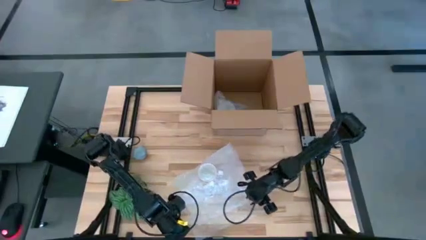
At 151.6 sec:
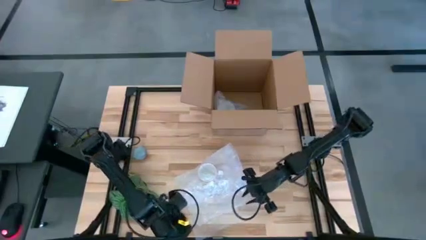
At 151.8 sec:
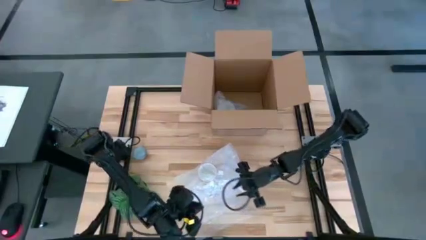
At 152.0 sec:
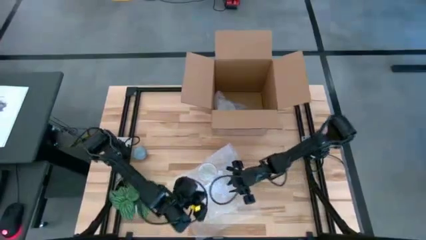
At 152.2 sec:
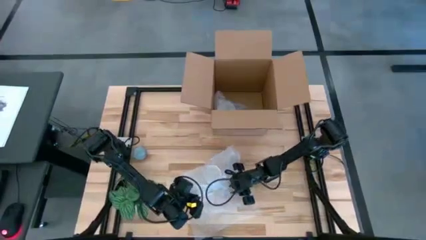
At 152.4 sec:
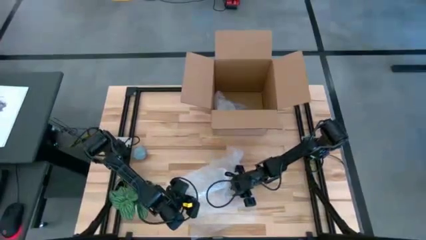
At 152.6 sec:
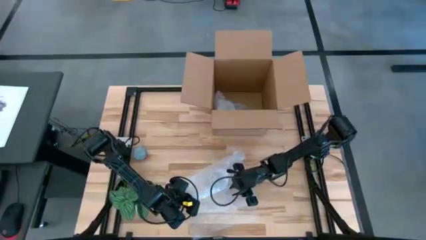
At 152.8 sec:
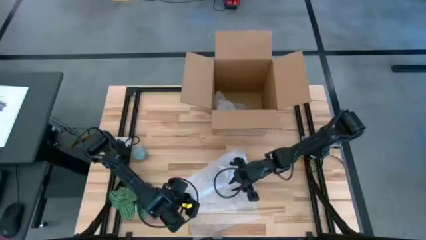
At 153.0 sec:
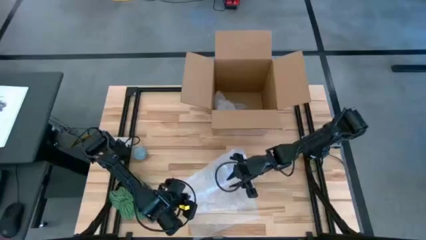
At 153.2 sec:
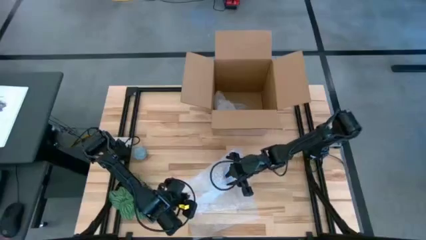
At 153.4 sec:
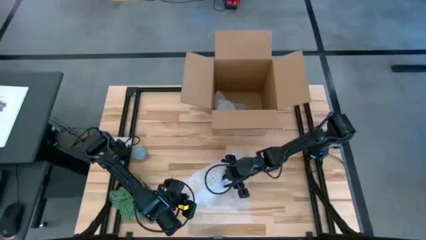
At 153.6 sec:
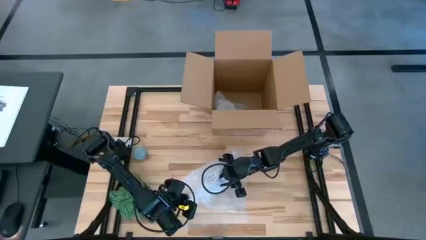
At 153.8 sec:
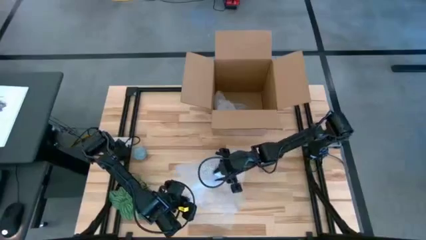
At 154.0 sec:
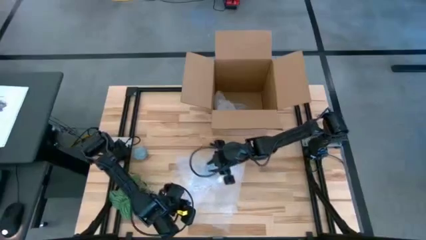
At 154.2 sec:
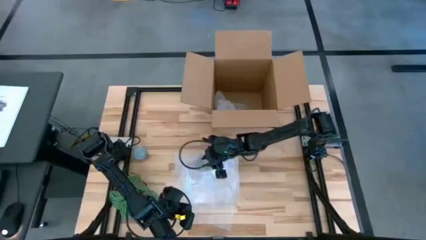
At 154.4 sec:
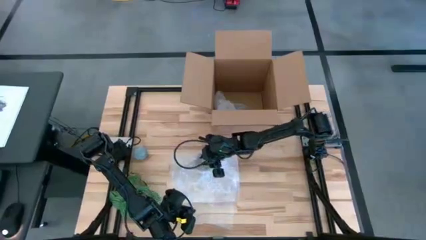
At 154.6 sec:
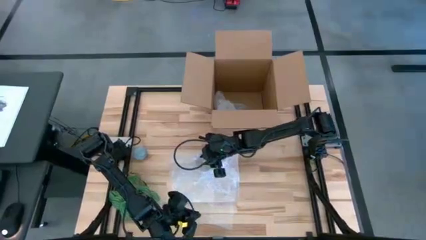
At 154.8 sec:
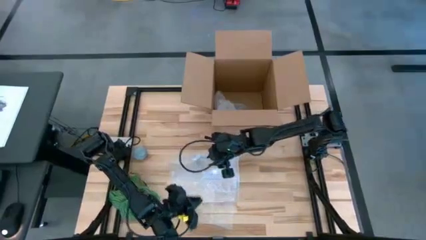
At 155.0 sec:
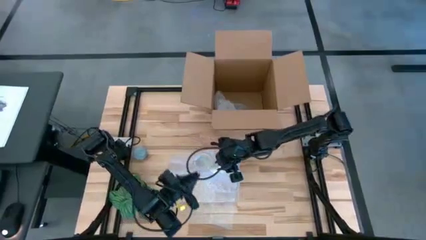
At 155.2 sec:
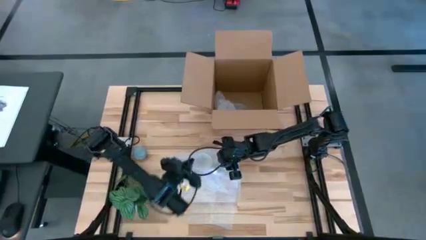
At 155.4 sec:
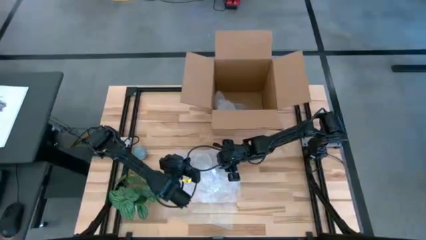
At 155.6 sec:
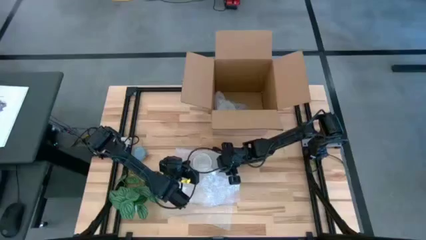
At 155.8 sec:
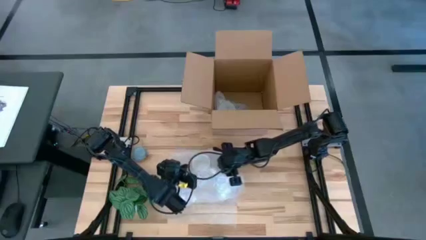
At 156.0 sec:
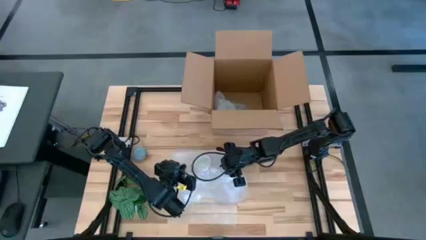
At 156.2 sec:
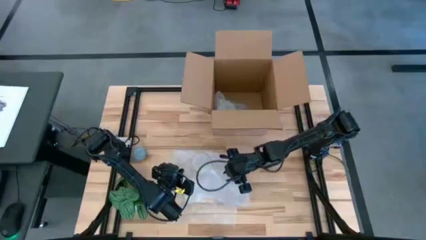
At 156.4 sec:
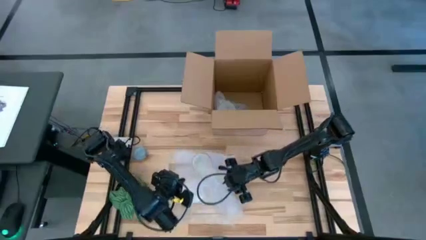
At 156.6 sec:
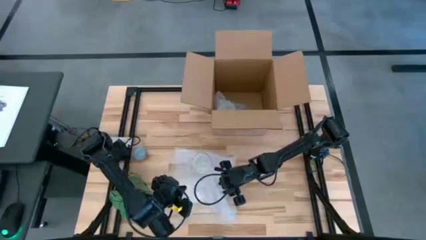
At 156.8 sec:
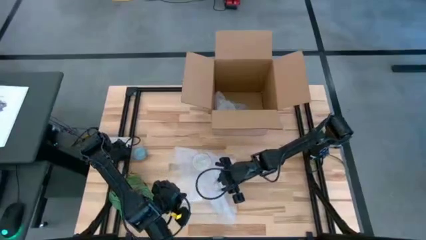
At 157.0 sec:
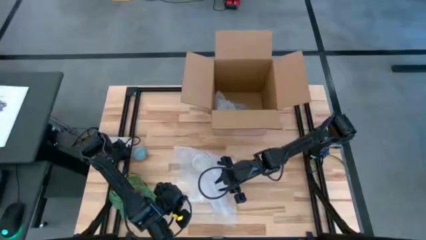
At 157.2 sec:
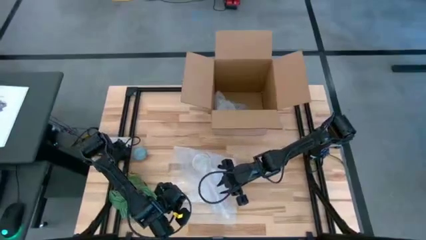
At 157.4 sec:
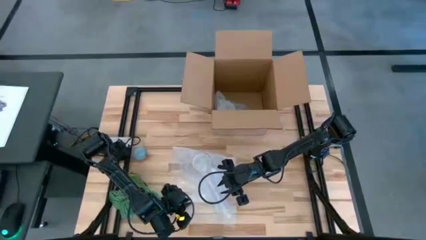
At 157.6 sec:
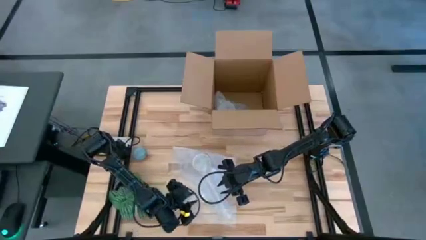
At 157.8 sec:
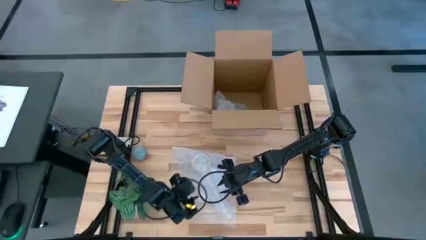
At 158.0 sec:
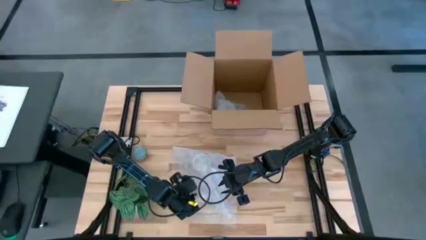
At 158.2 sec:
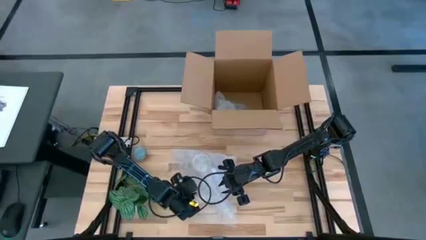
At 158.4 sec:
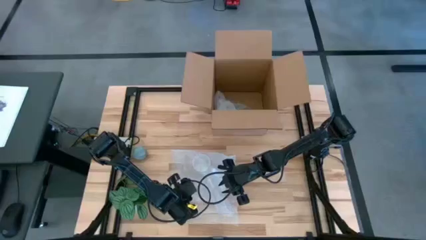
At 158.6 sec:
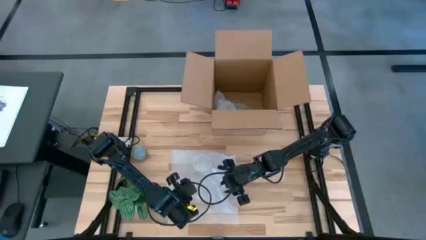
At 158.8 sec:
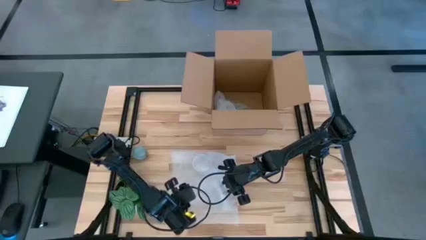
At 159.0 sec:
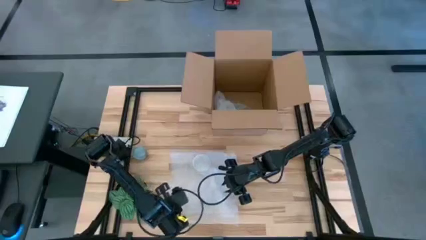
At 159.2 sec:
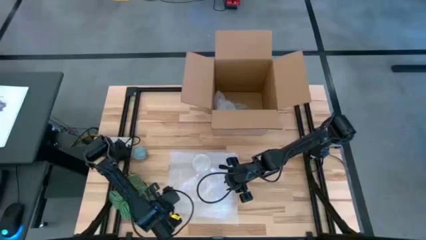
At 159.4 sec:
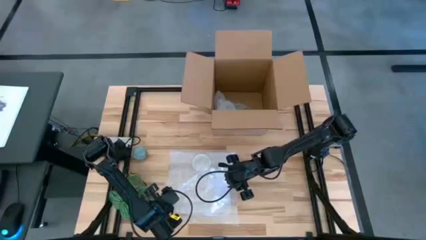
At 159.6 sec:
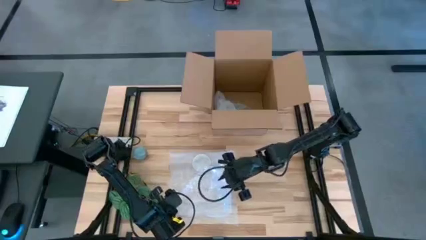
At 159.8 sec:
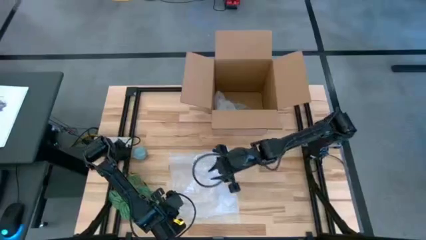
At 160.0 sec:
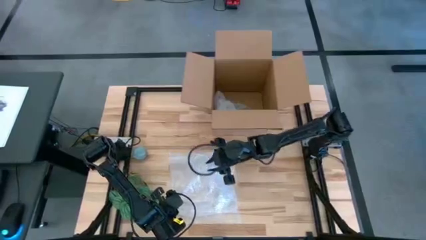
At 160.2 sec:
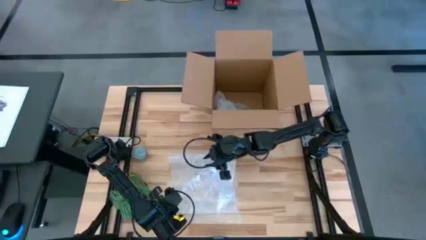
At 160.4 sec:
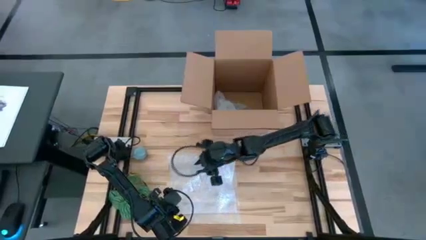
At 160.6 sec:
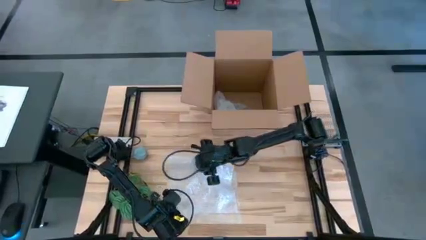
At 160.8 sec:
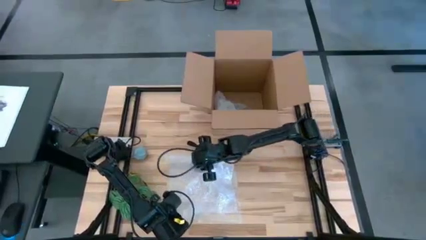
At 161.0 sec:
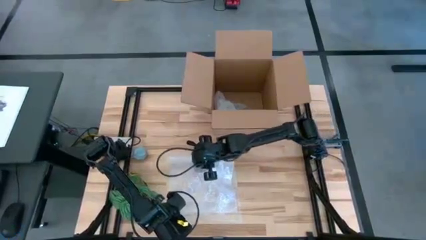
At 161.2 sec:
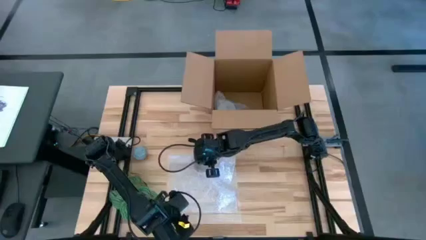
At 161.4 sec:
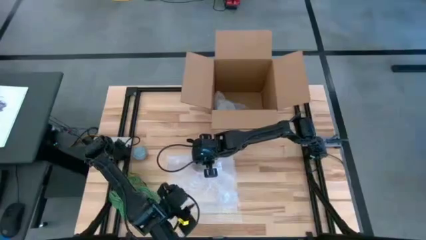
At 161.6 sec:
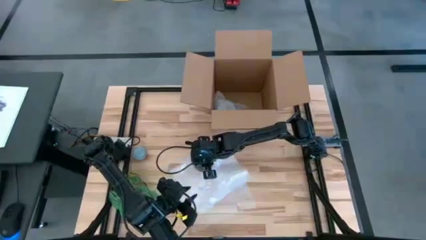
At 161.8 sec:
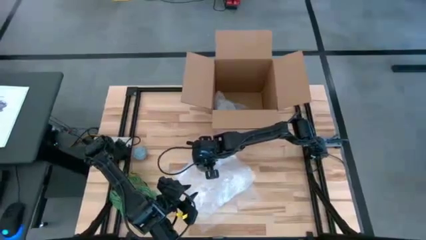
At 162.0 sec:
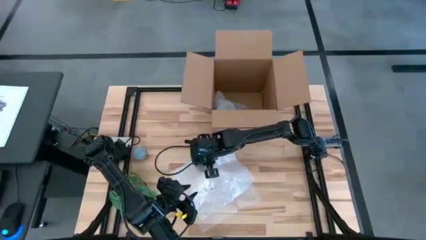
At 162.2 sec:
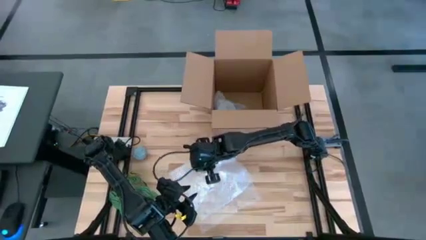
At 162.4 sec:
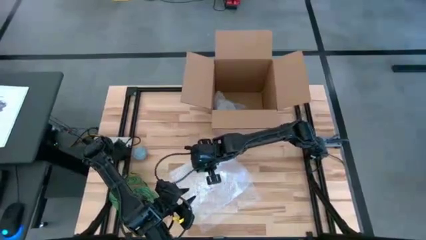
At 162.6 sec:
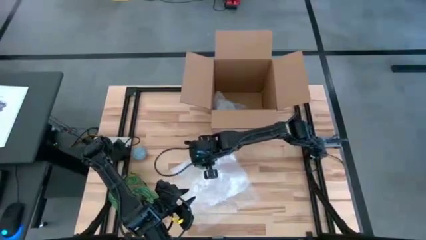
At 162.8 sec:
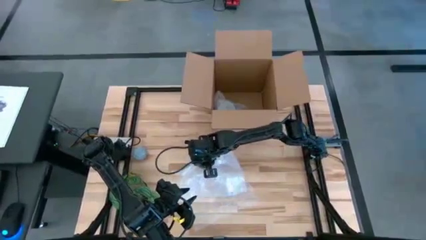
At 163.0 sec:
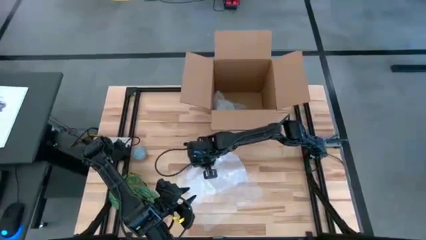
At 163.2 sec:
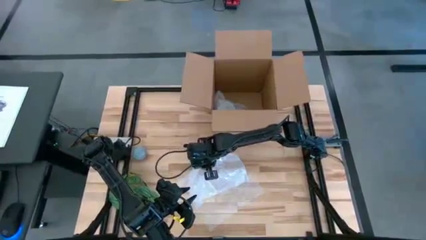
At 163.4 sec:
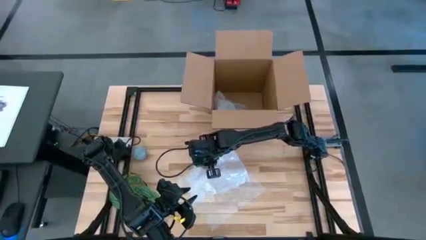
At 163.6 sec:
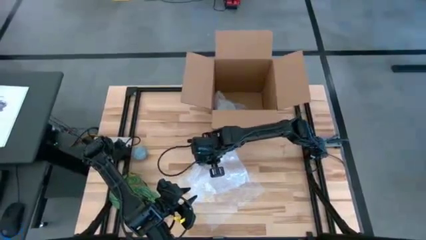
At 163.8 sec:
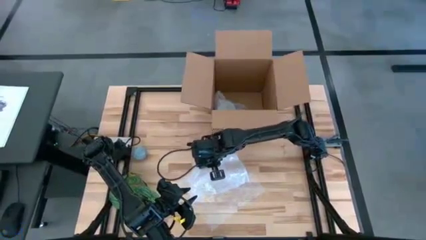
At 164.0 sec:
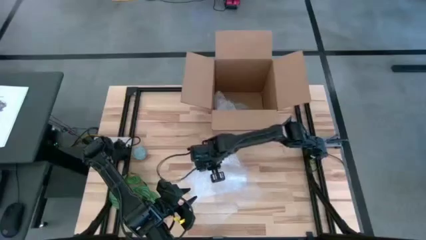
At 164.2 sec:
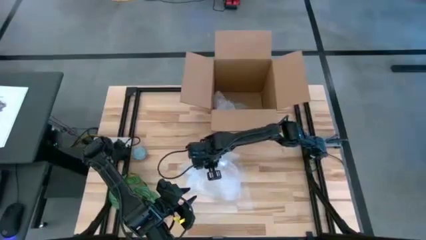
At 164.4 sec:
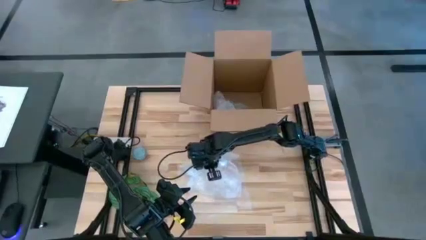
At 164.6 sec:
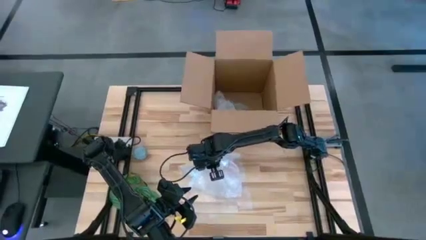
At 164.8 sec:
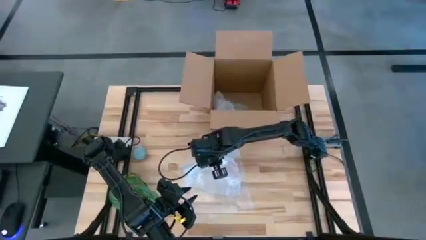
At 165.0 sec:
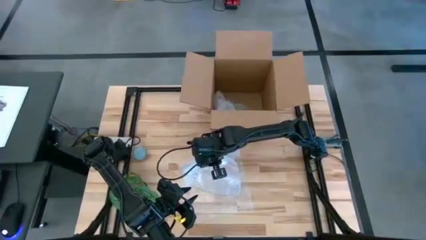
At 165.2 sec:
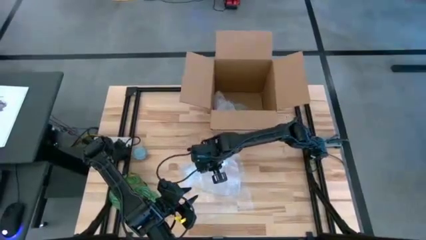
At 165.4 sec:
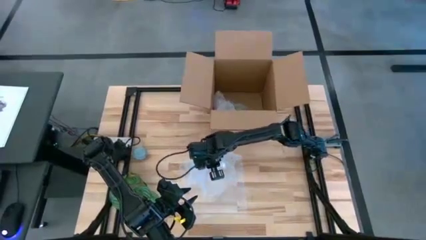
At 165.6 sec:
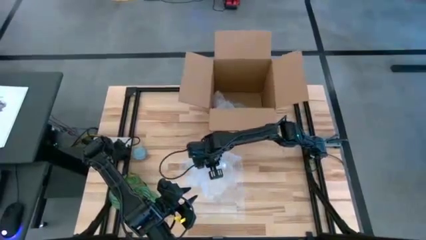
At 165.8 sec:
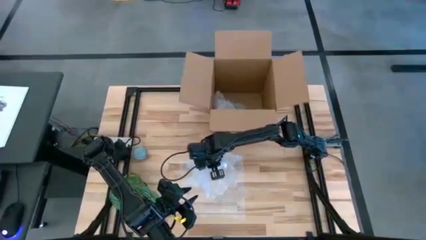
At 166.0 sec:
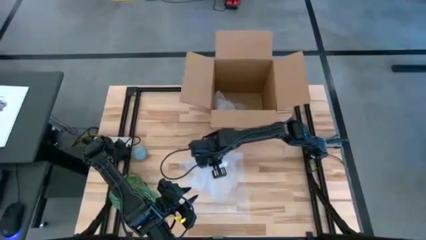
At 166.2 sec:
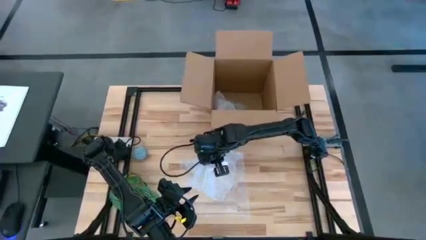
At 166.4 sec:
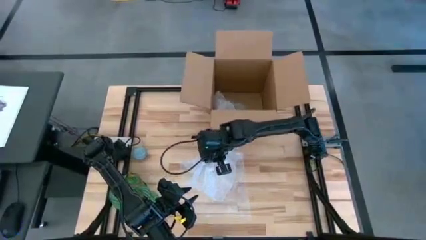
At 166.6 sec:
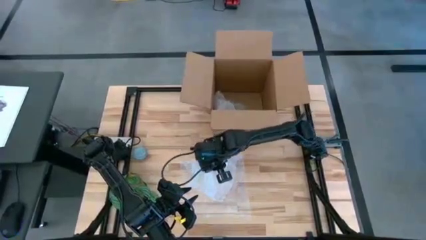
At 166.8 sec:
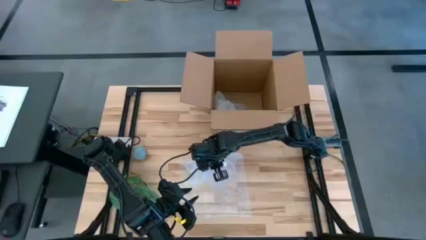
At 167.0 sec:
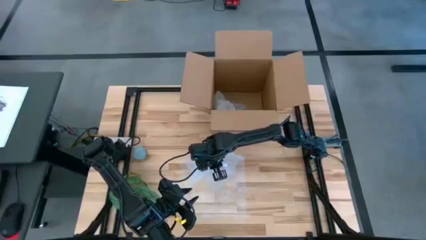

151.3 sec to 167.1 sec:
Task: wrap mug
Wrap the white gray mug with bubble wrap
